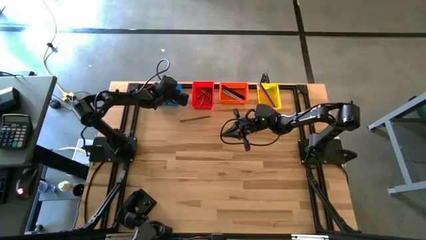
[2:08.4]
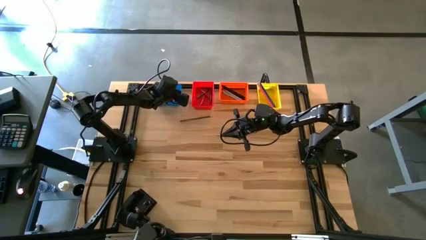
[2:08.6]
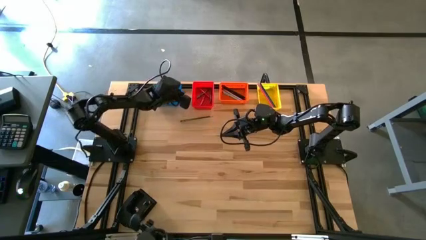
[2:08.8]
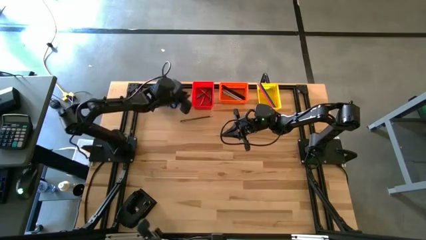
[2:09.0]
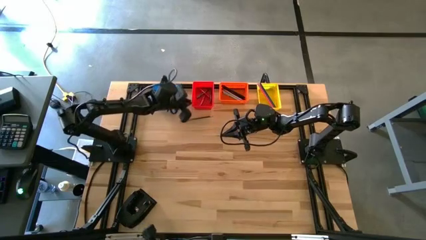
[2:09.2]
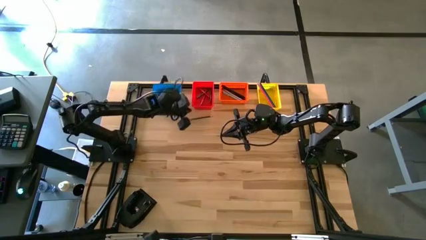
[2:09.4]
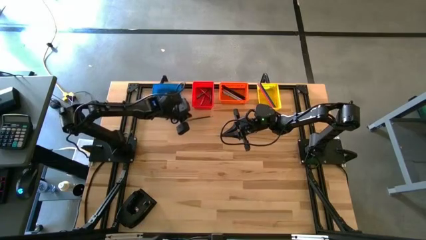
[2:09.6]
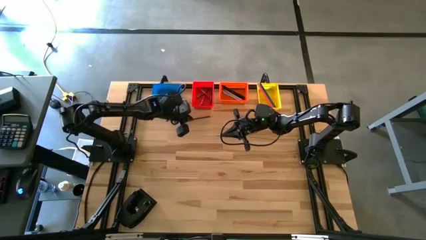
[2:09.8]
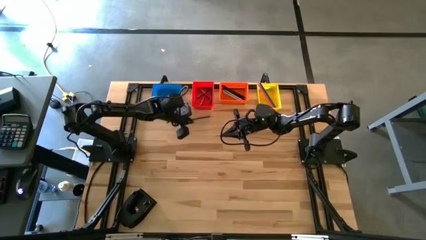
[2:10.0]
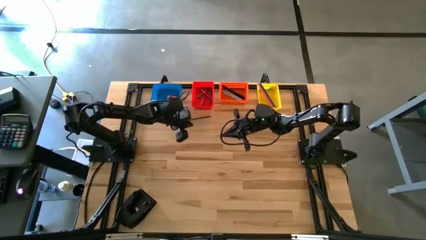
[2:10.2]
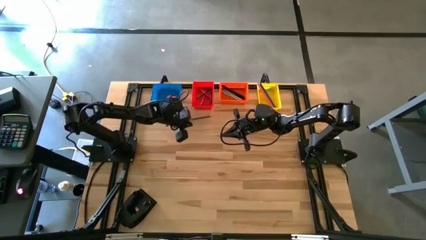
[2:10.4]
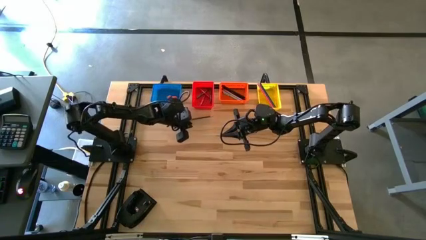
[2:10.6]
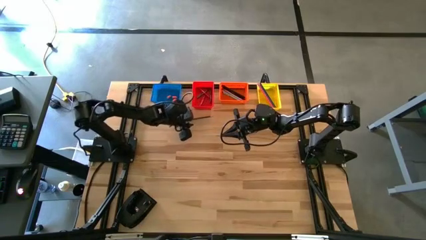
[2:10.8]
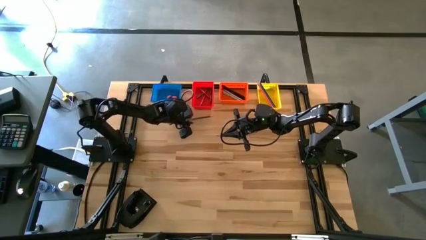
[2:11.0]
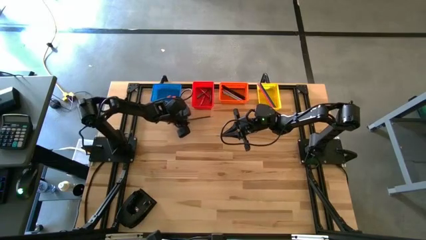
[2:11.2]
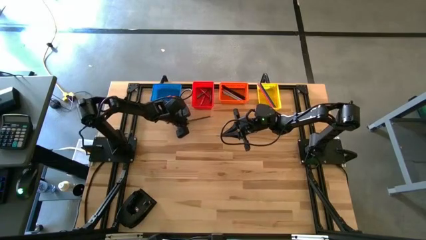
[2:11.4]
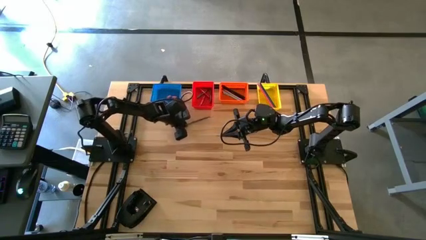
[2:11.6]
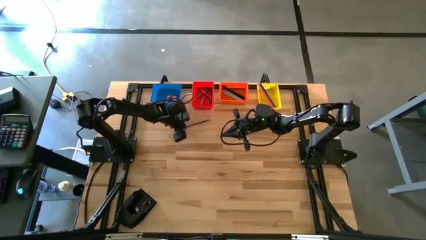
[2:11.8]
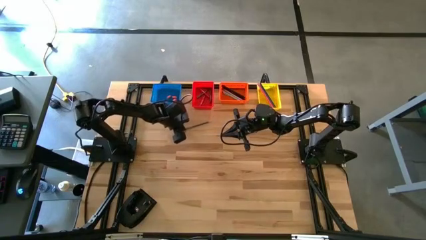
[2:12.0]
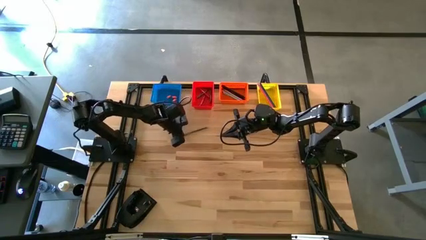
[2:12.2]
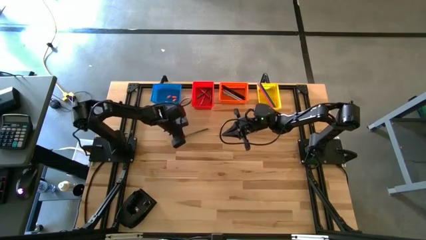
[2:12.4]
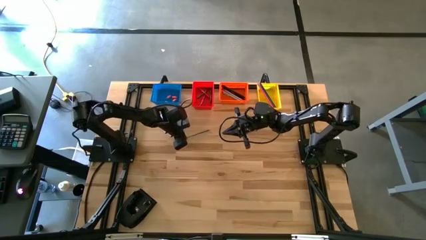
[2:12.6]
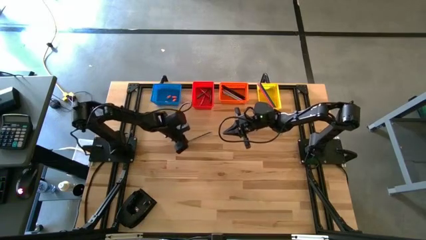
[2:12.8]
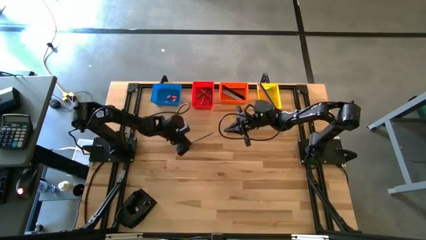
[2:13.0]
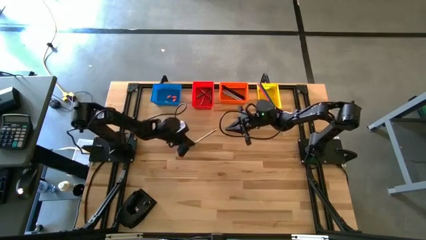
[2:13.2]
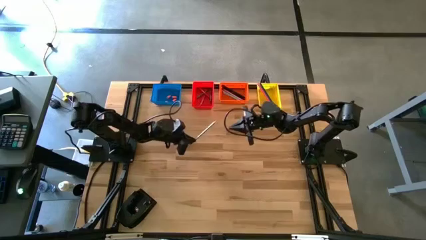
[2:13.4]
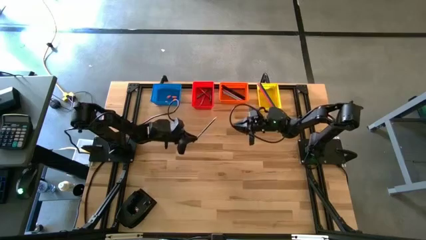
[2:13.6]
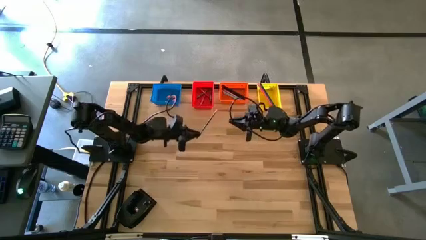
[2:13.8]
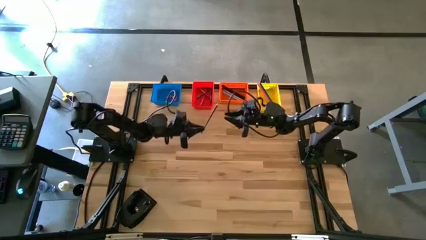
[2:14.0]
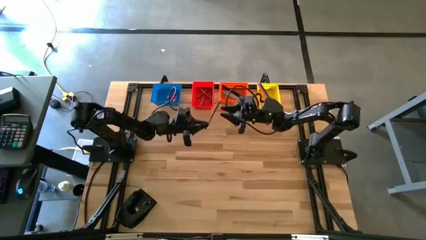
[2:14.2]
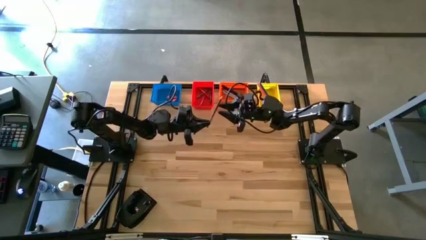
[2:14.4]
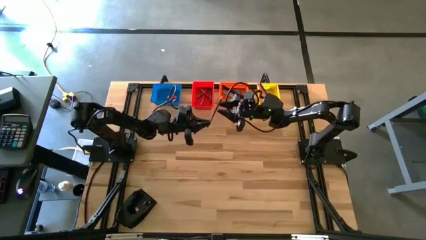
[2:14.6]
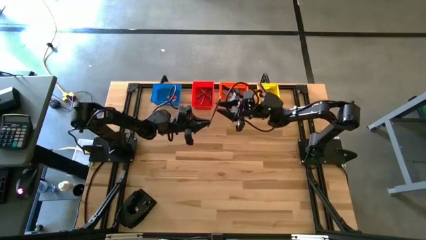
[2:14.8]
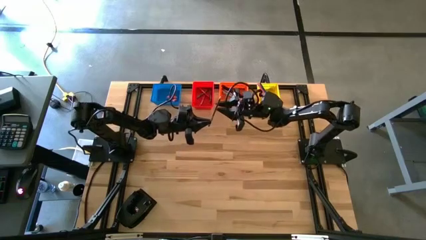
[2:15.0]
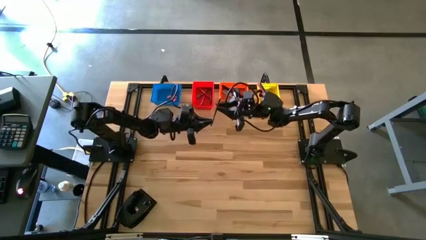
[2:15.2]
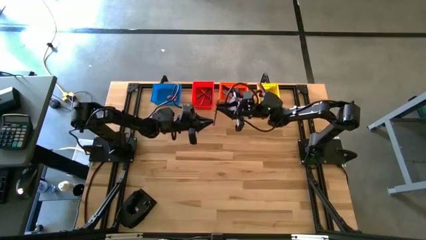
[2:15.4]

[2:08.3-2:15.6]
Task: Sort crayons/erasers/pens/pencils in bins
Put the dark blue colored pencil into the yellow bin

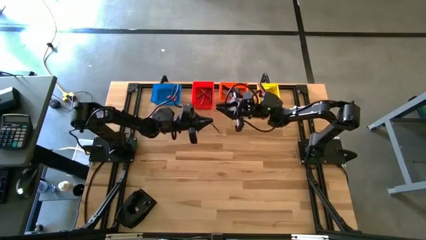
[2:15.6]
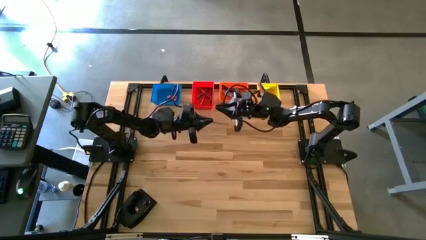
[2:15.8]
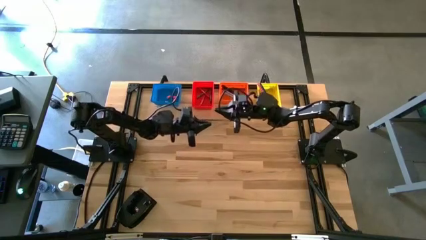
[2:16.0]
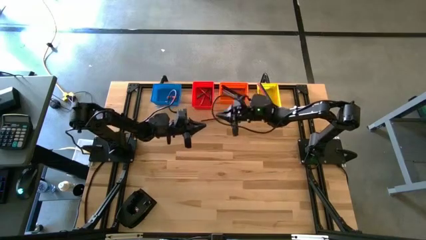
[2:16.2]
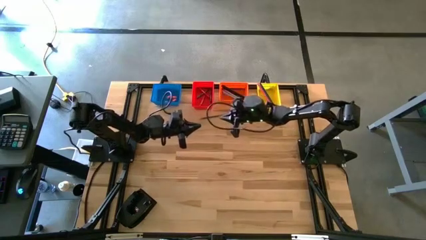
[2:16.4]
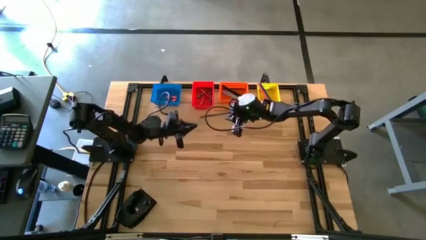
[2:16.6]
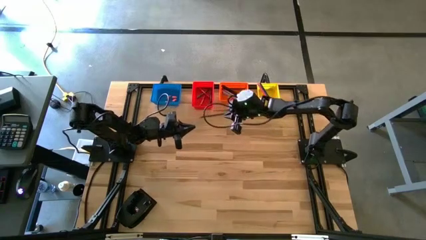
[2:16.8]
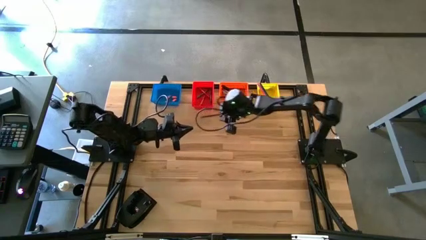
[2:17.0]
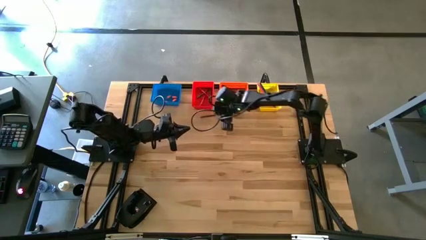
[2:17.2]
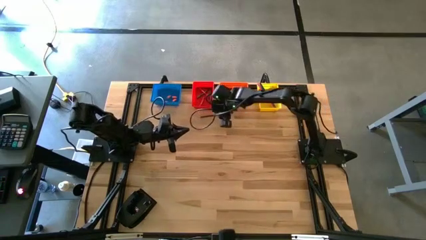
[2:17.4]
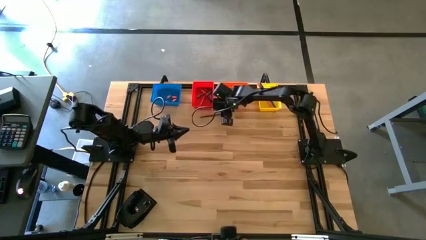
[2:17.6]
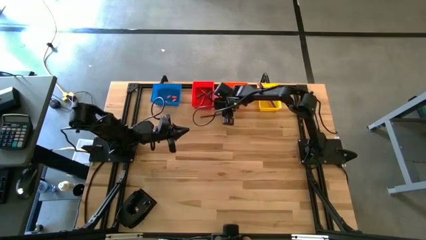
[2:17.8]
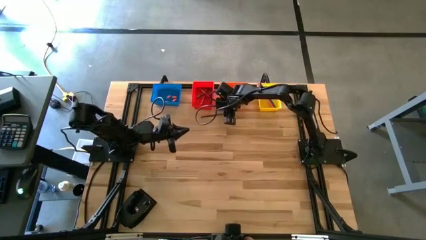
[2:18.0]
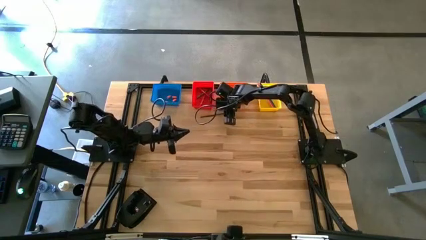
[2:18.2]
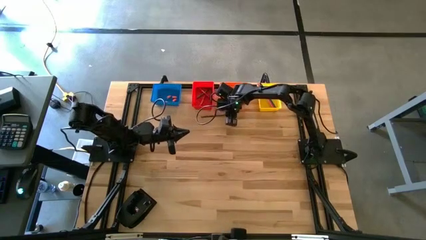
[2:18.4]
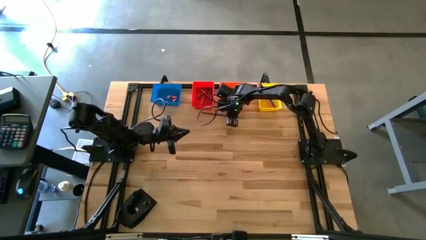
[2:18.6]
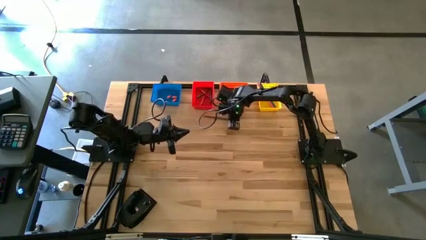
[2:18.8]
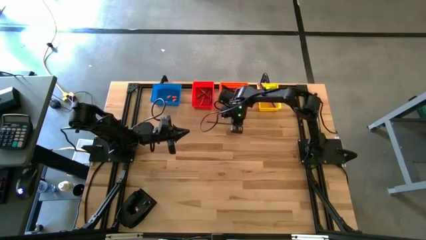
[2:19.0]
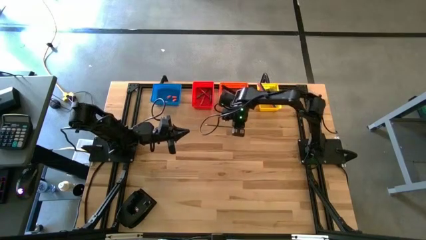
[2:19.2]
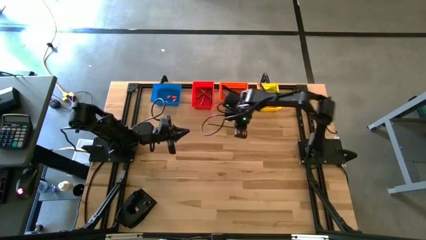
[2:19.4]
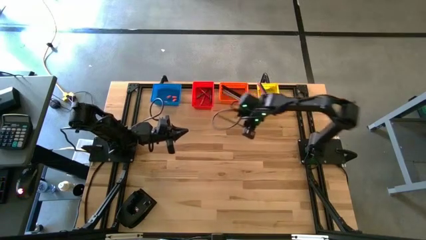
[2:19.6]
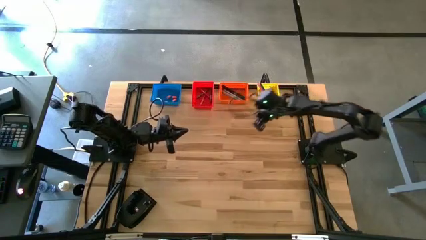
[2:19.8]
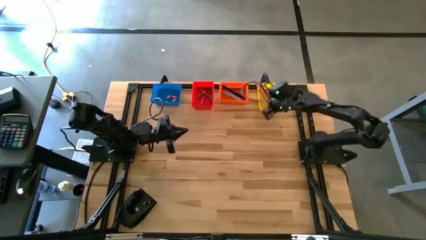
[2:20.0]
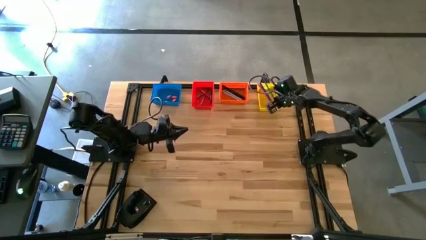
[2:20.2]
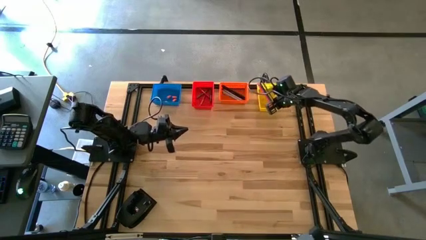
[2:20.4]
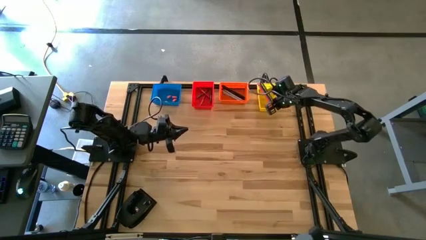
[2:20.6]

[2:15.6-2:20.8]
Put the dark blue colored pencil into the yellow bin
